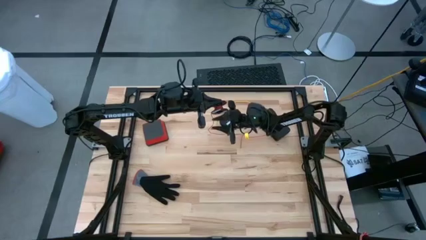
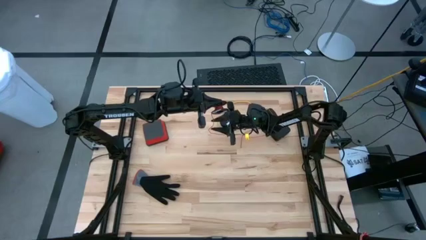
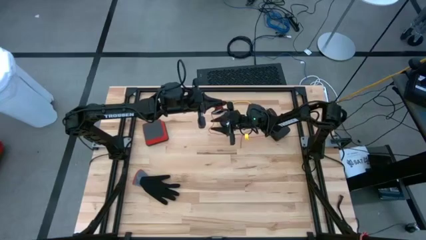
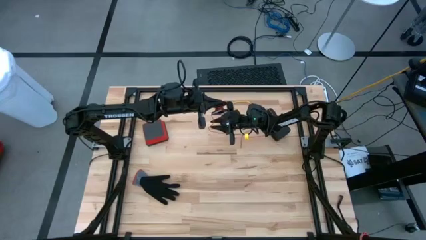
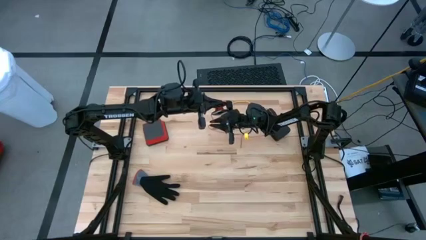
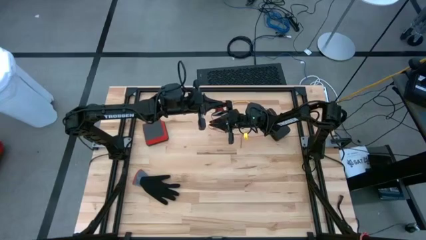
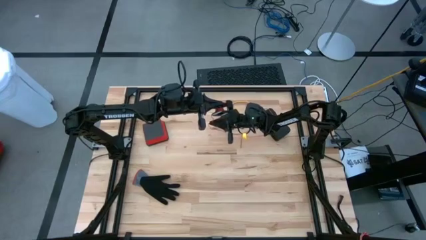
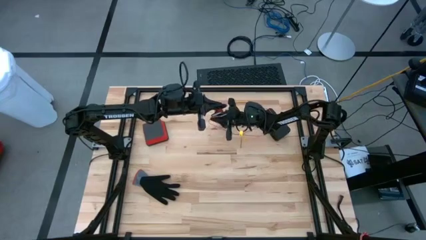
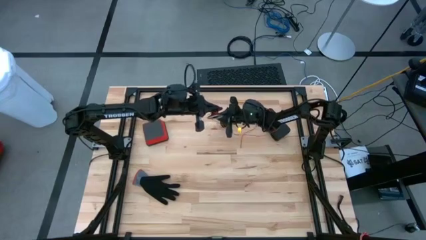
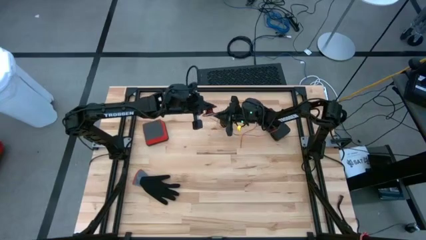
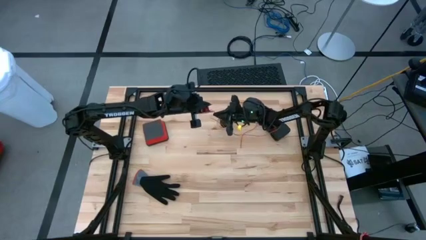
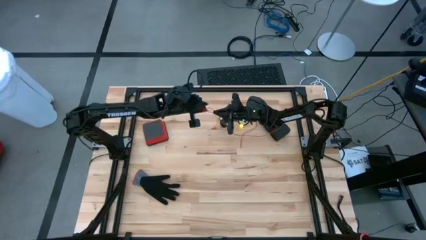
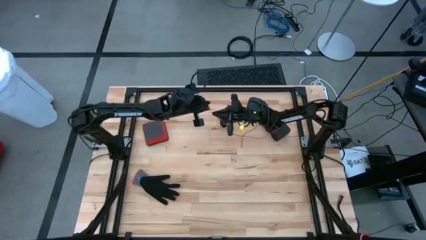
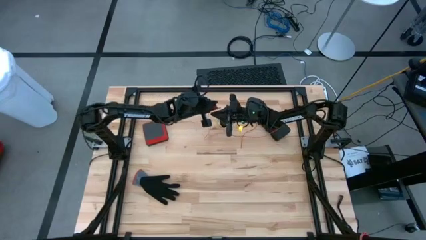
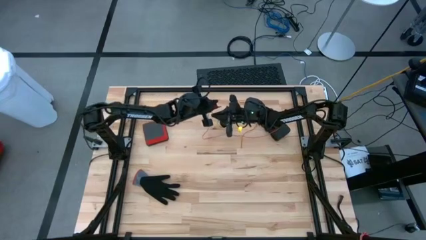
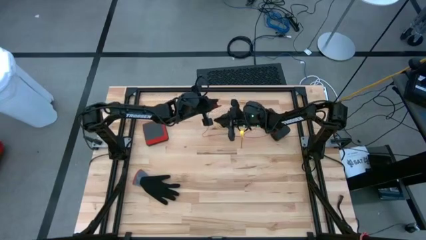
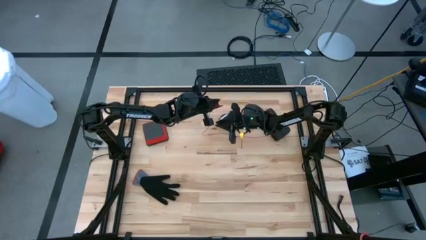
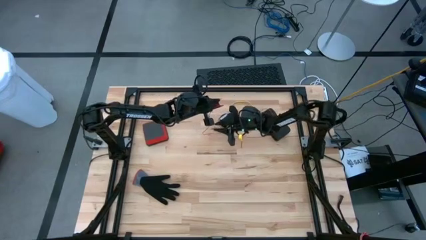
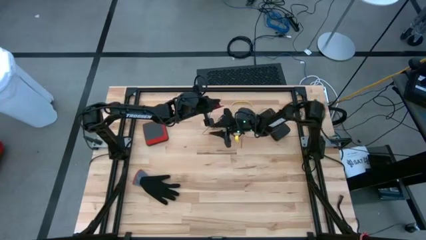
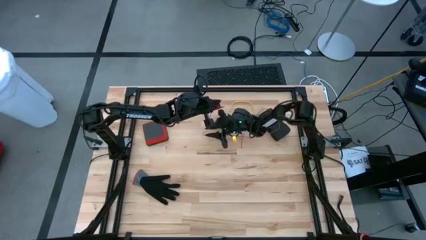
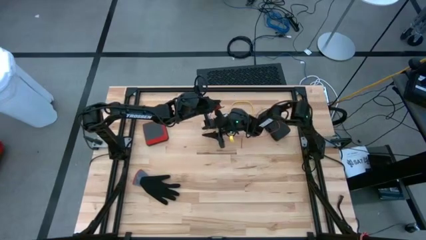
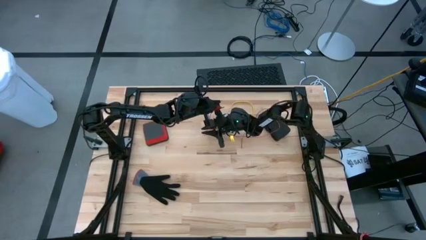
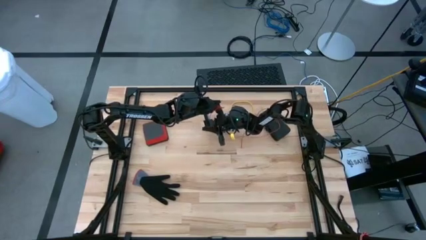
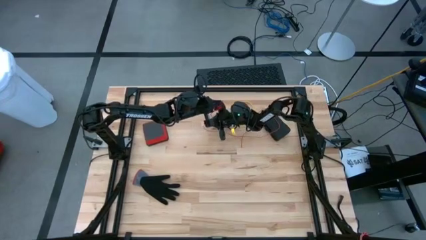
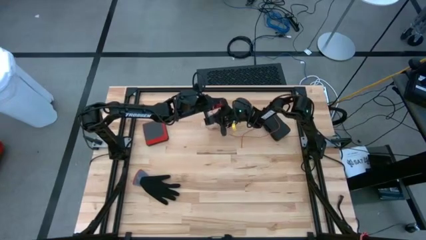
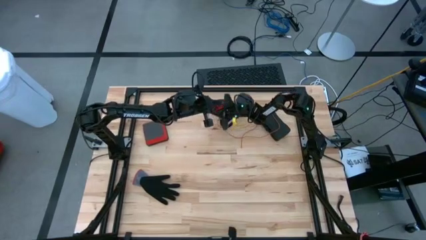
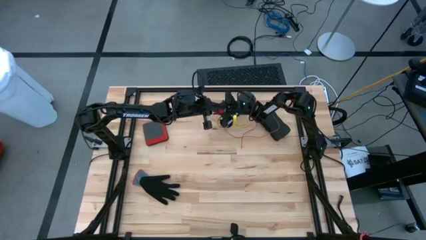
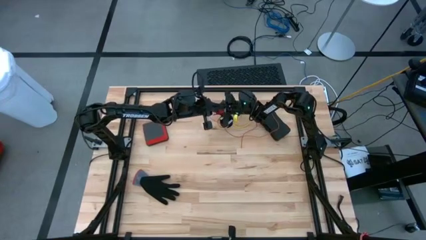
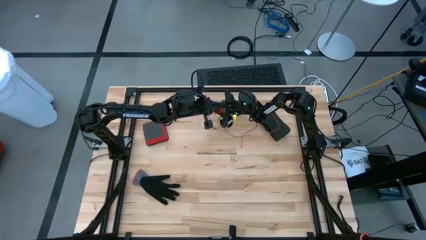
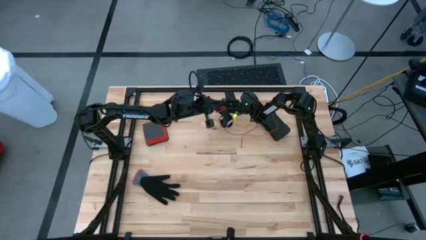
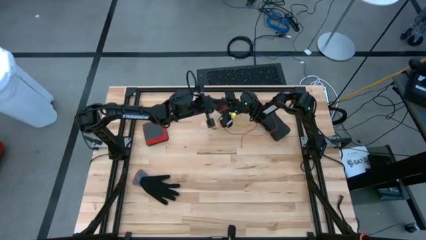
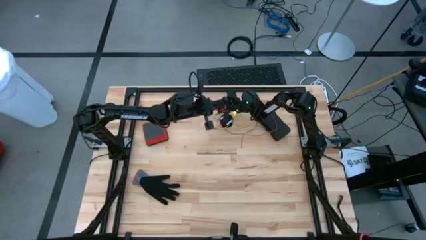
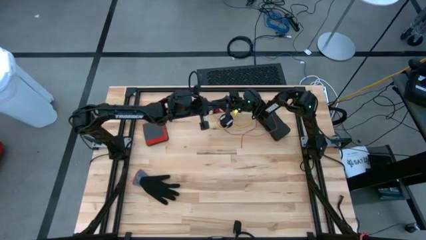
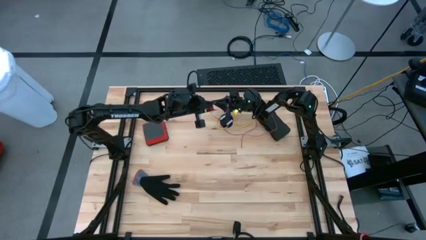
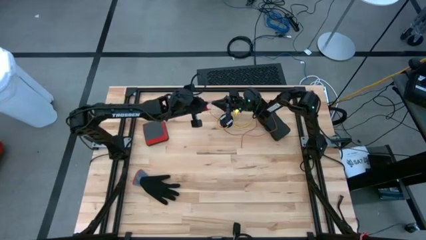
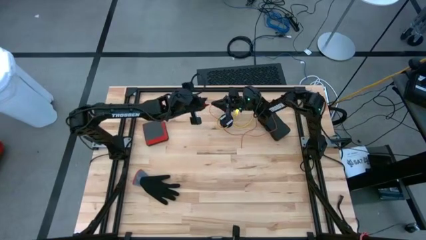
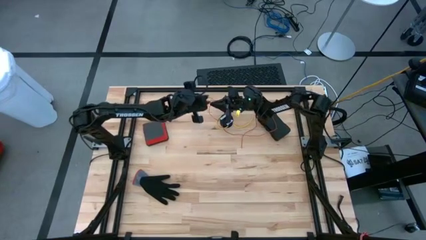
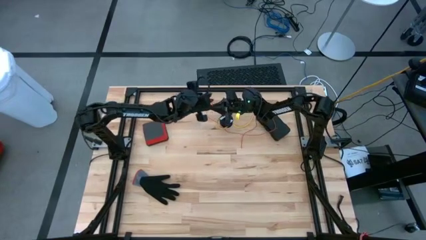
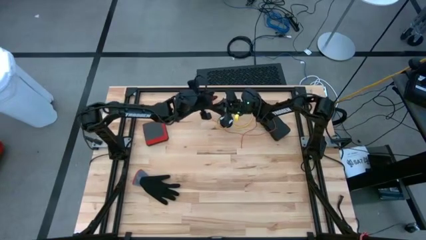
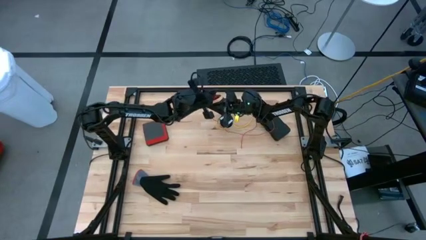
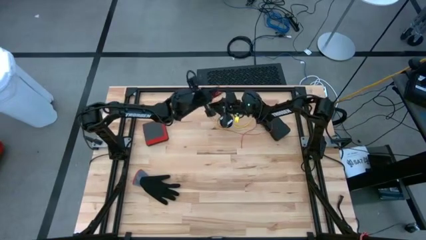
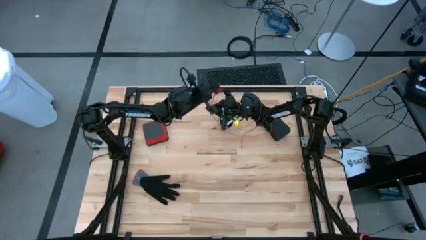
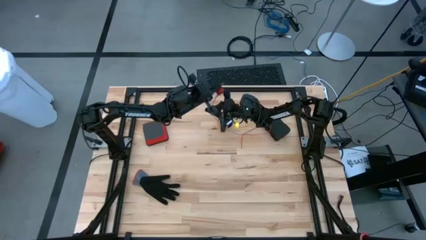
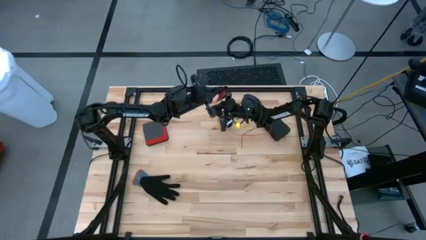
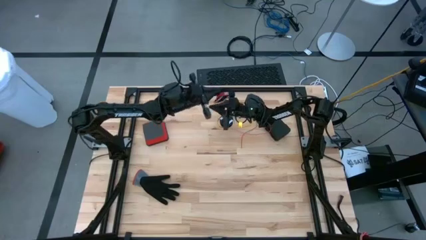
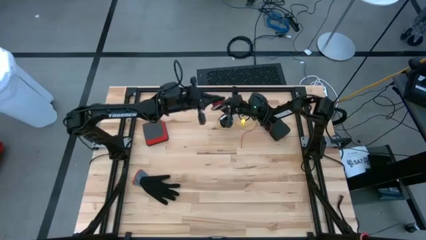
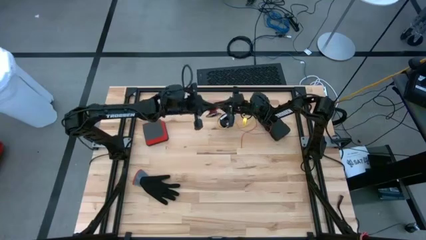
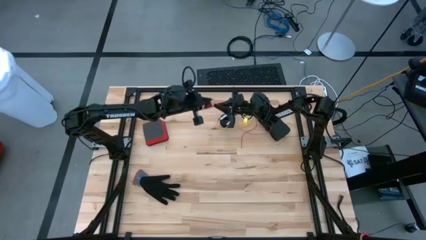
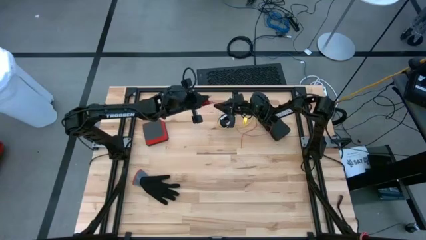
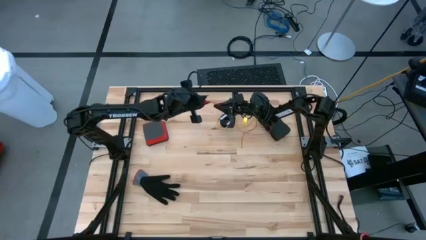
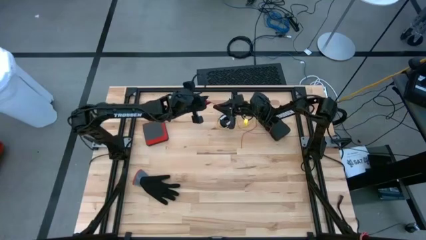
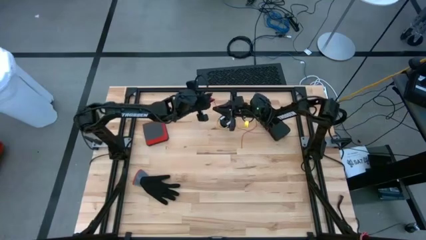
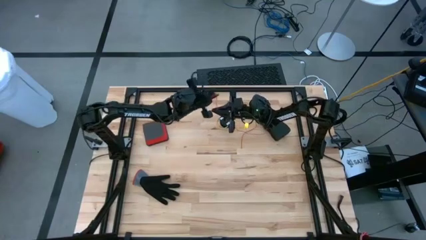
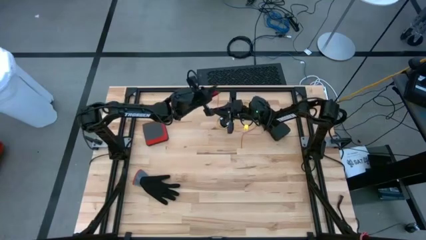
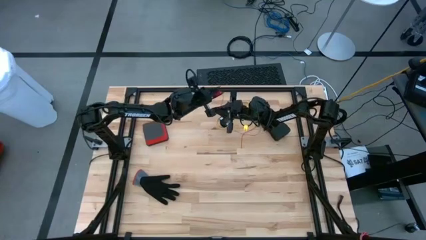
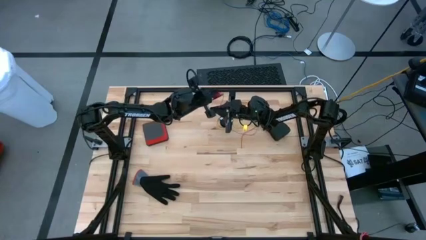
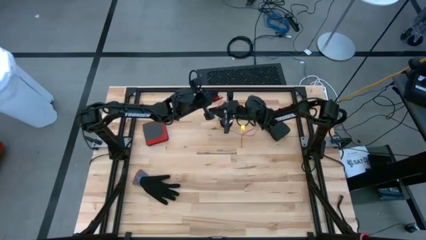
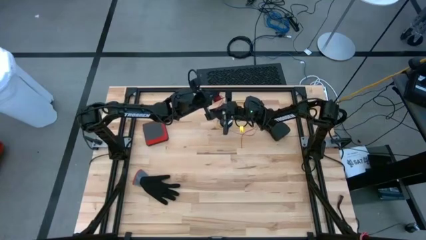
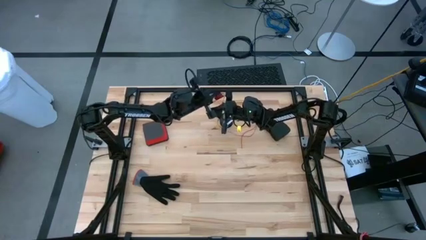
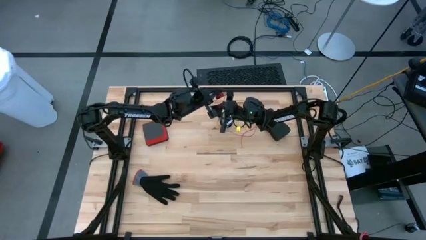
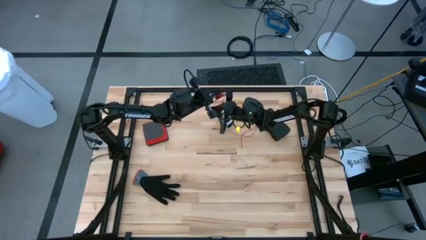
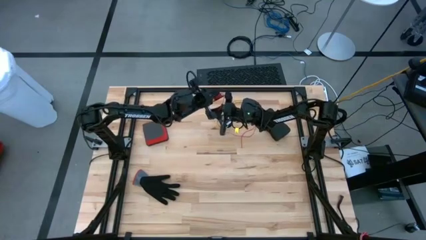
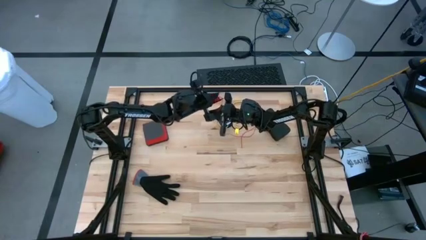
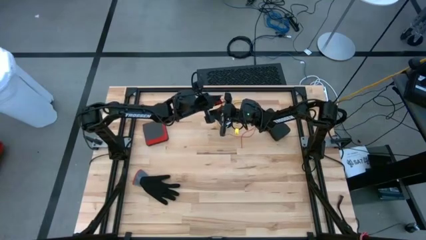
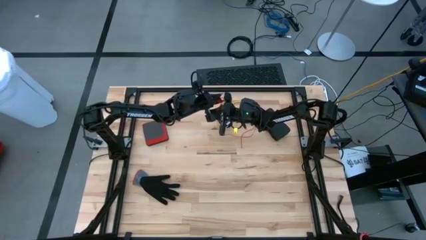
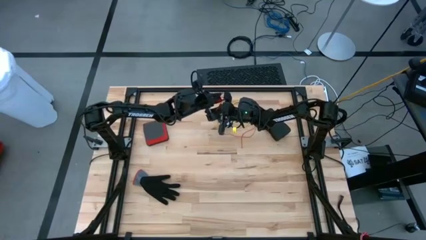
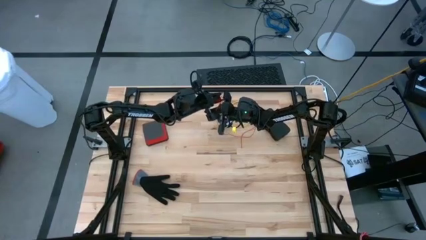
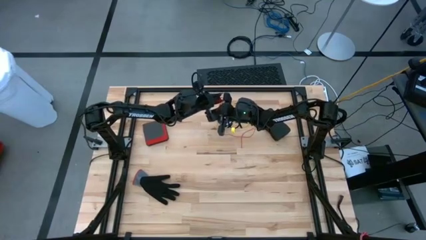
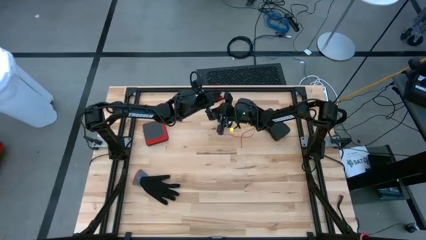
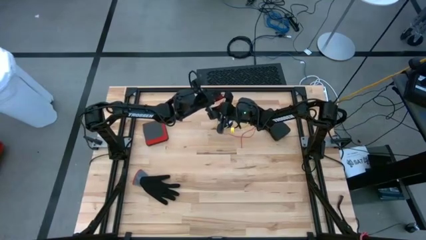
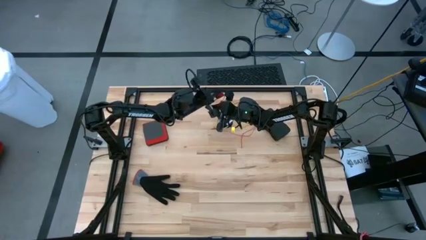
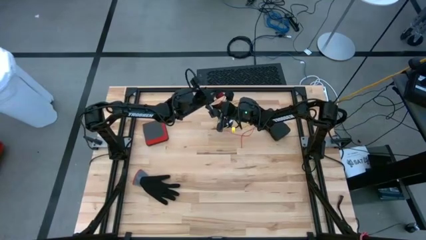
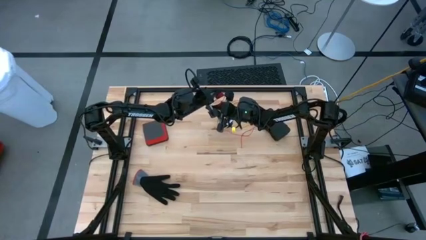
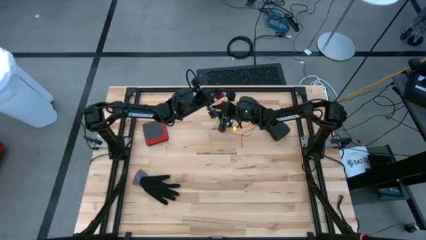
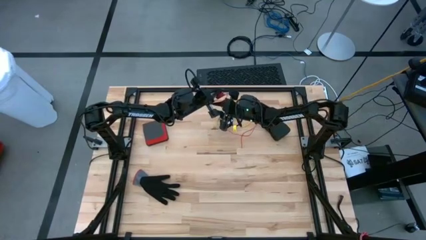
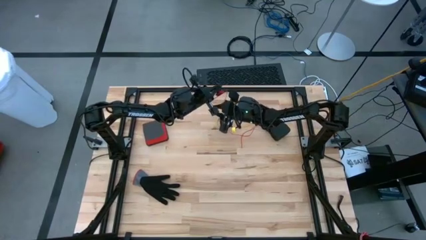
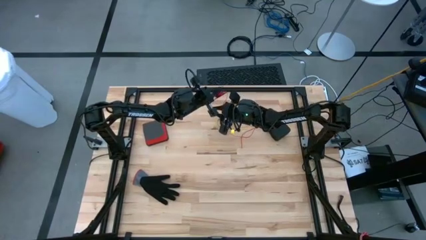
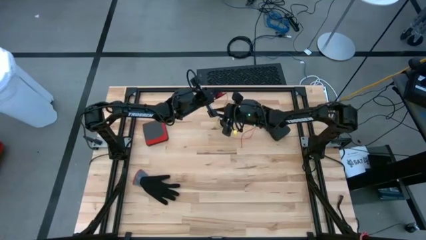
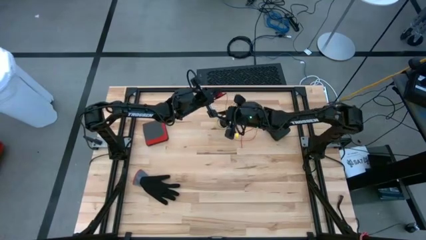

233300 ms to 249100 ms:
Task: Coil cords
Coil the red wire into the spool
